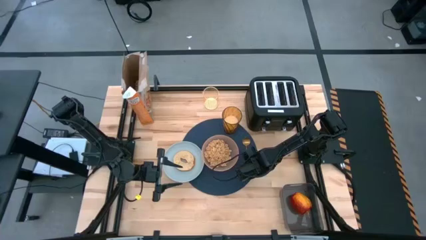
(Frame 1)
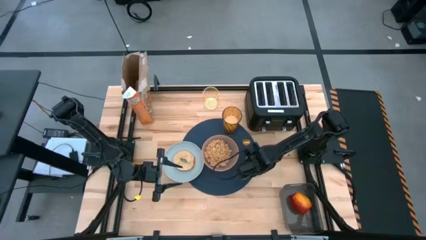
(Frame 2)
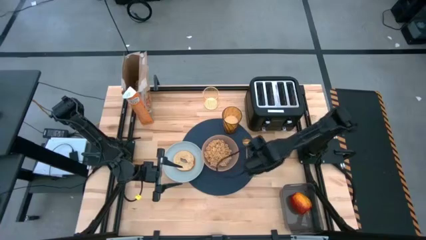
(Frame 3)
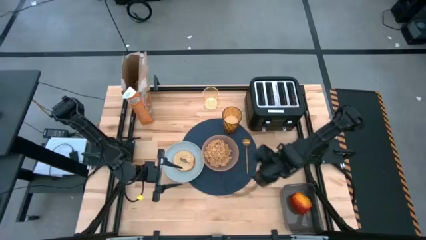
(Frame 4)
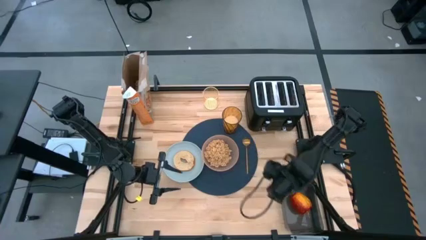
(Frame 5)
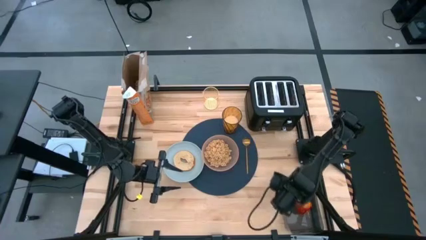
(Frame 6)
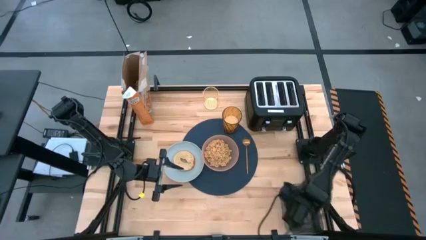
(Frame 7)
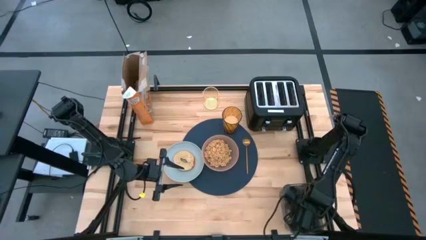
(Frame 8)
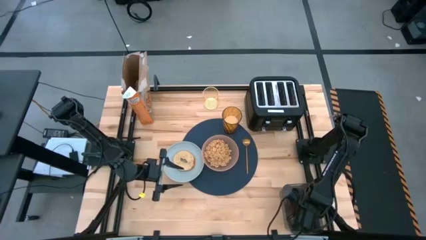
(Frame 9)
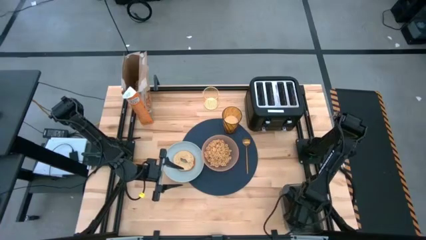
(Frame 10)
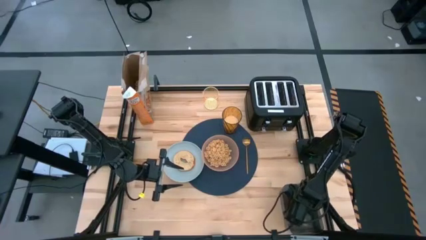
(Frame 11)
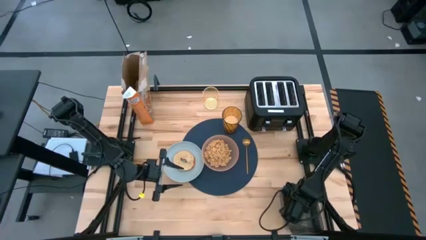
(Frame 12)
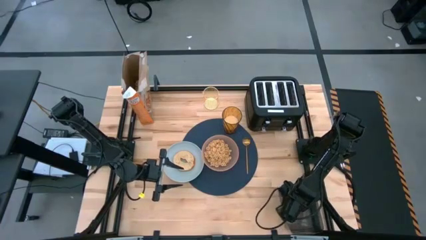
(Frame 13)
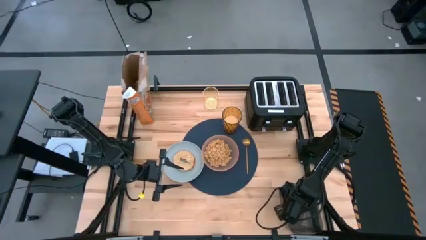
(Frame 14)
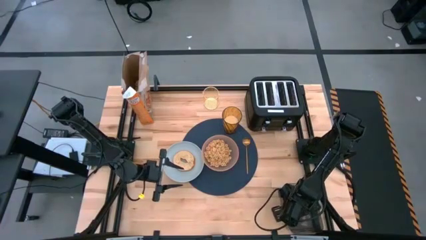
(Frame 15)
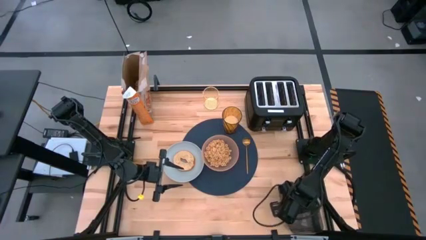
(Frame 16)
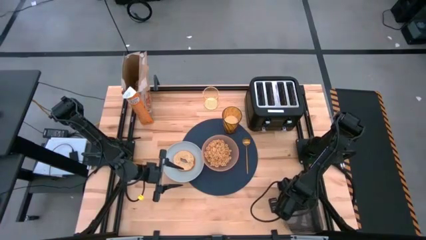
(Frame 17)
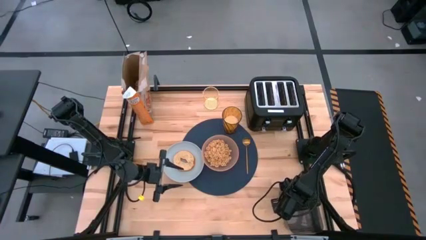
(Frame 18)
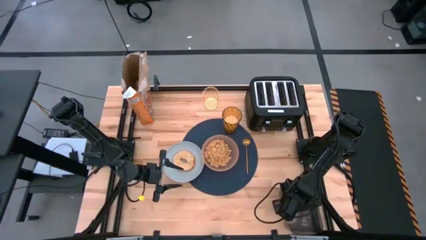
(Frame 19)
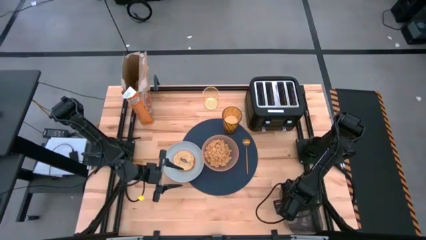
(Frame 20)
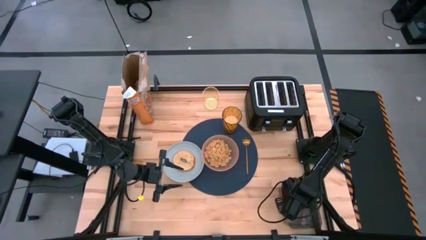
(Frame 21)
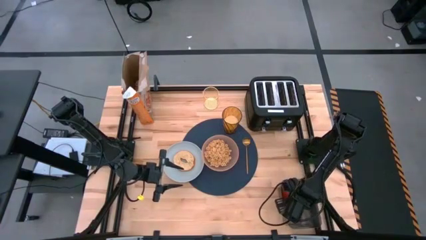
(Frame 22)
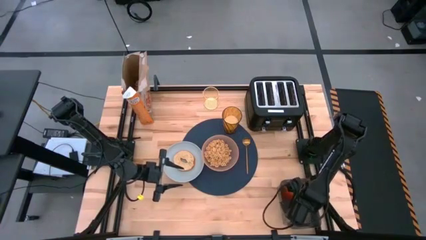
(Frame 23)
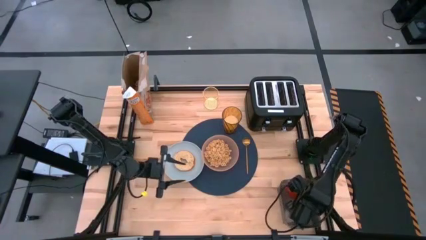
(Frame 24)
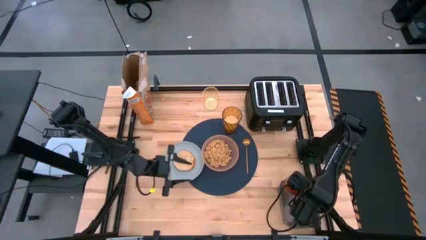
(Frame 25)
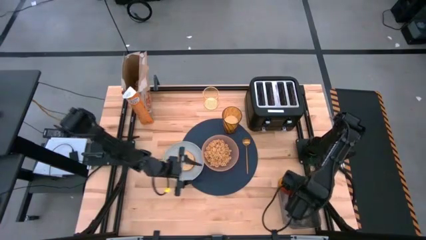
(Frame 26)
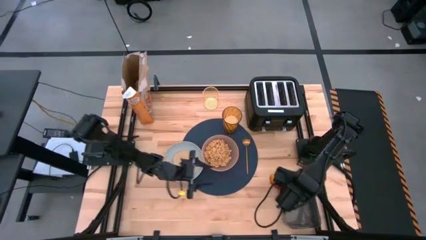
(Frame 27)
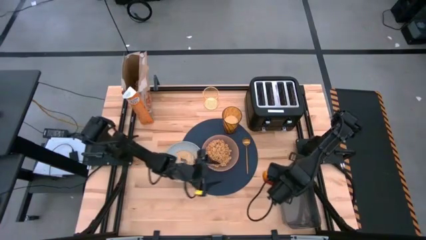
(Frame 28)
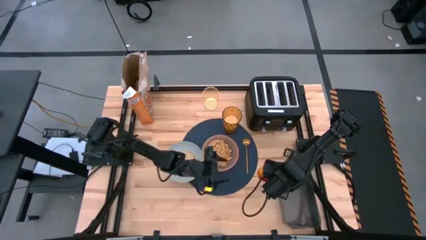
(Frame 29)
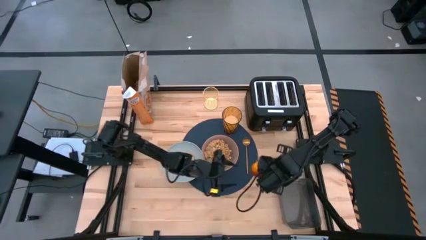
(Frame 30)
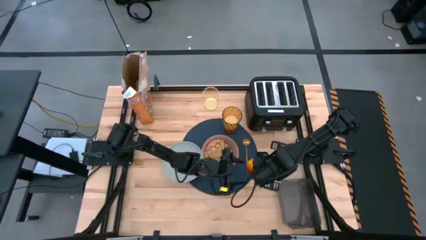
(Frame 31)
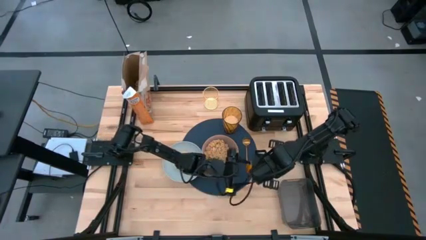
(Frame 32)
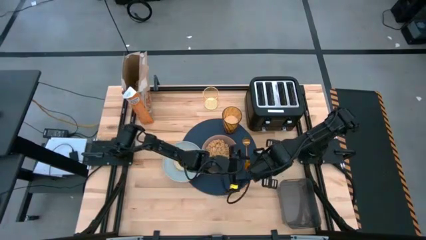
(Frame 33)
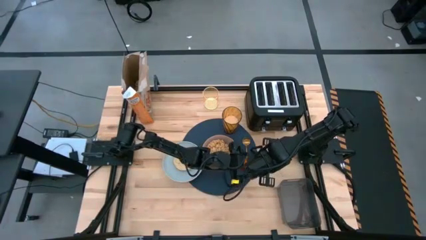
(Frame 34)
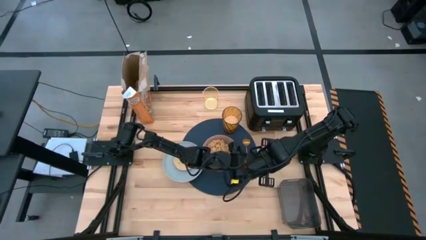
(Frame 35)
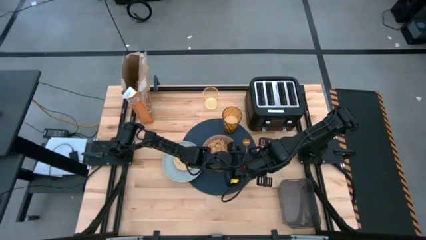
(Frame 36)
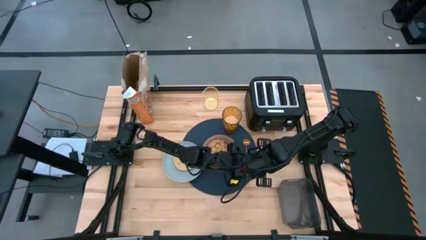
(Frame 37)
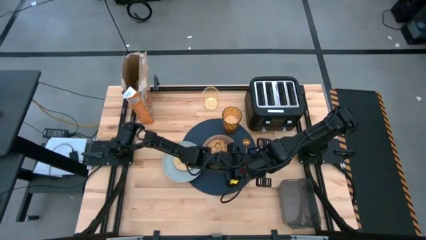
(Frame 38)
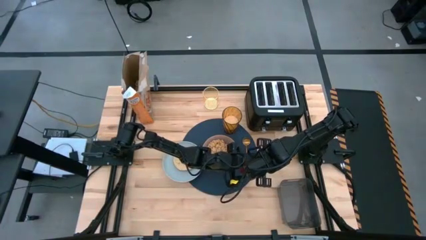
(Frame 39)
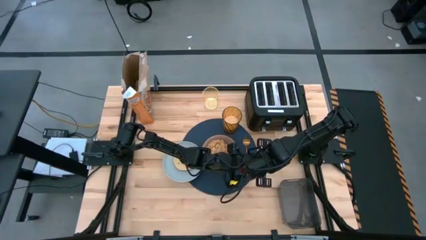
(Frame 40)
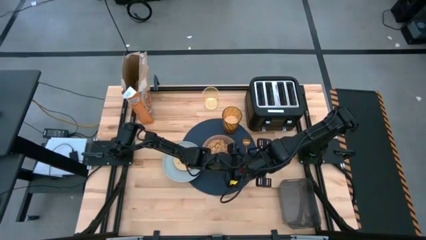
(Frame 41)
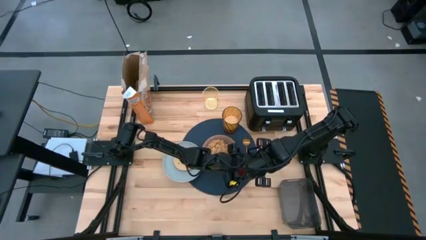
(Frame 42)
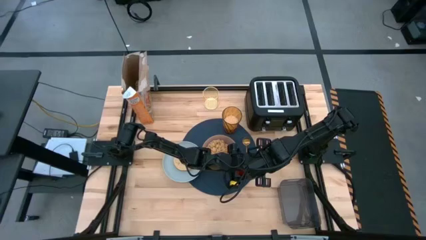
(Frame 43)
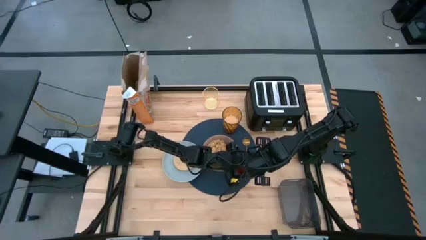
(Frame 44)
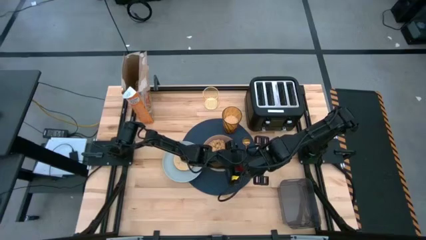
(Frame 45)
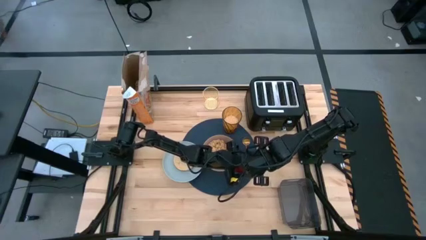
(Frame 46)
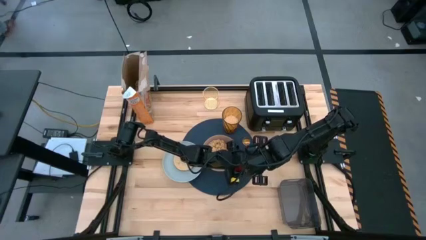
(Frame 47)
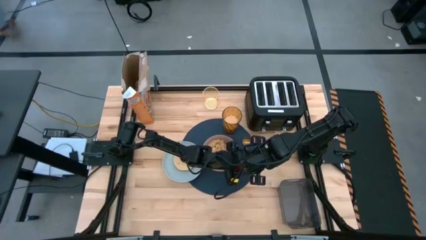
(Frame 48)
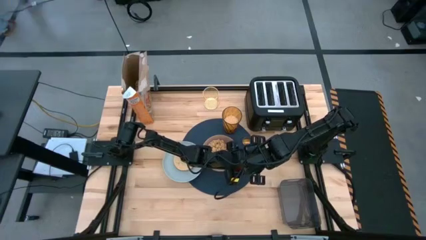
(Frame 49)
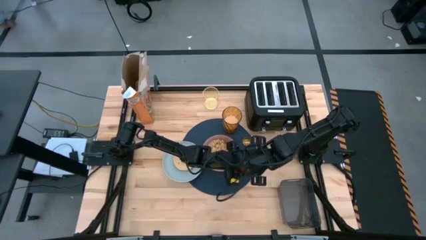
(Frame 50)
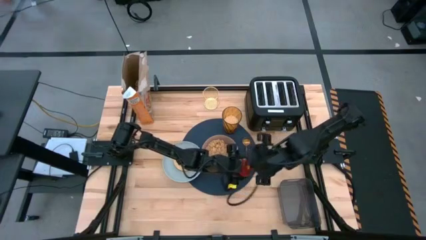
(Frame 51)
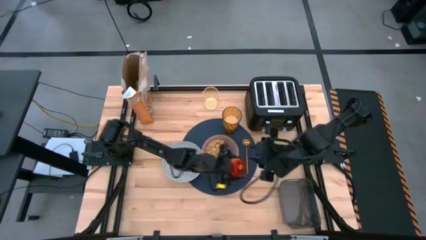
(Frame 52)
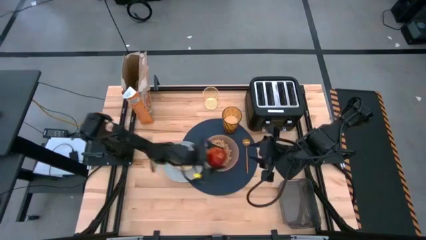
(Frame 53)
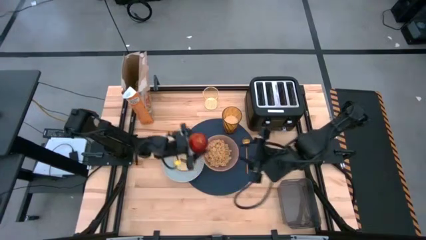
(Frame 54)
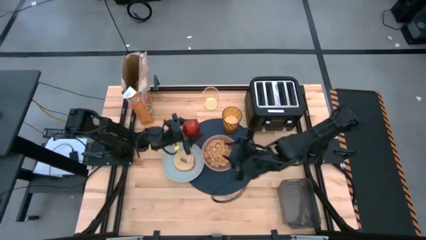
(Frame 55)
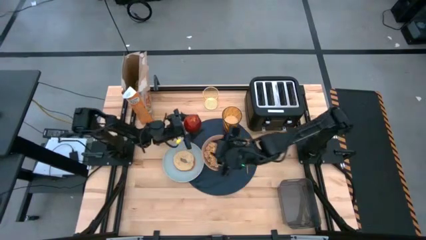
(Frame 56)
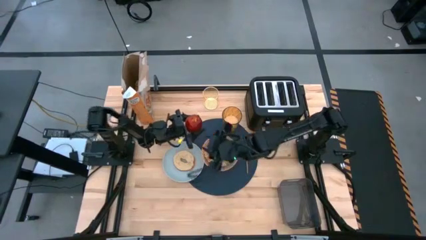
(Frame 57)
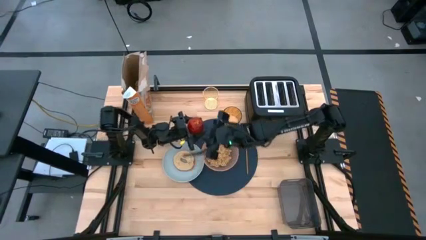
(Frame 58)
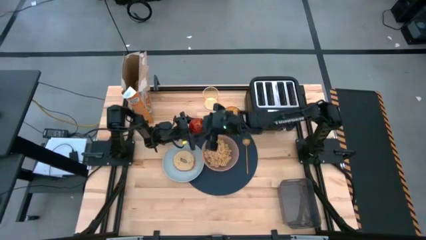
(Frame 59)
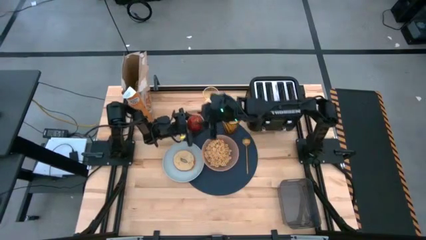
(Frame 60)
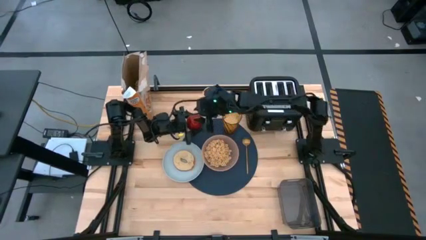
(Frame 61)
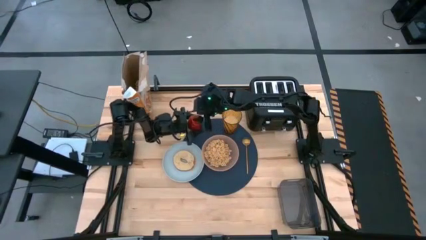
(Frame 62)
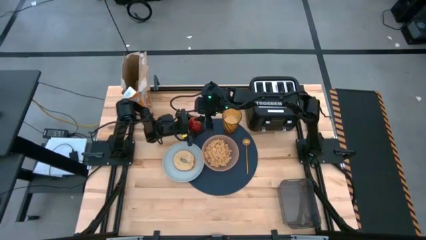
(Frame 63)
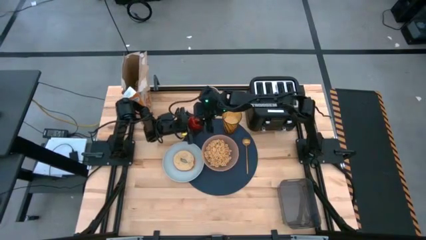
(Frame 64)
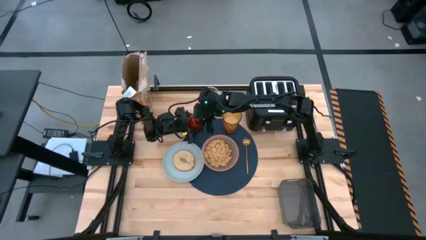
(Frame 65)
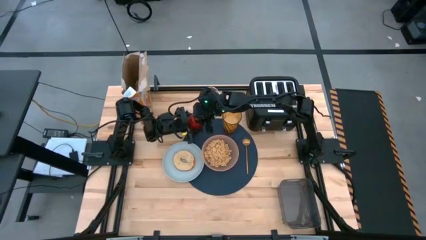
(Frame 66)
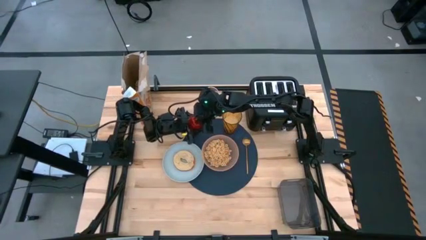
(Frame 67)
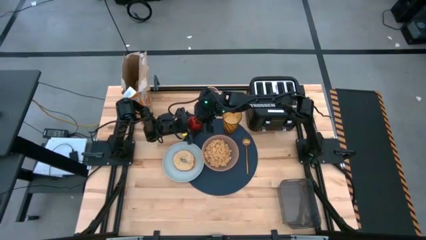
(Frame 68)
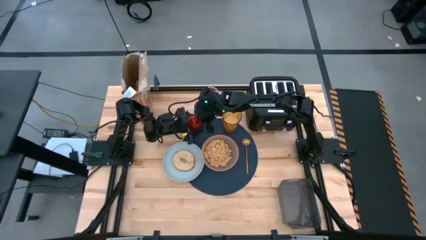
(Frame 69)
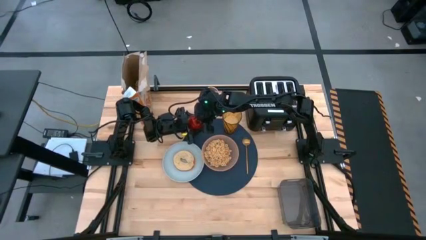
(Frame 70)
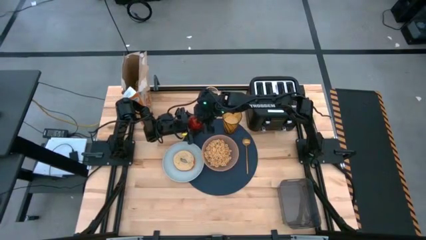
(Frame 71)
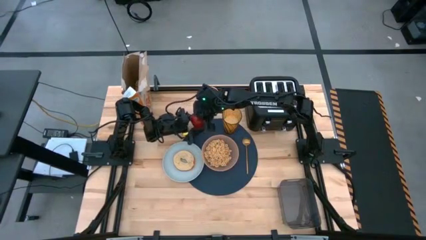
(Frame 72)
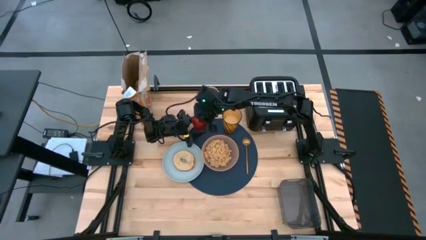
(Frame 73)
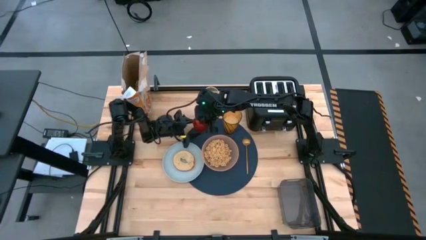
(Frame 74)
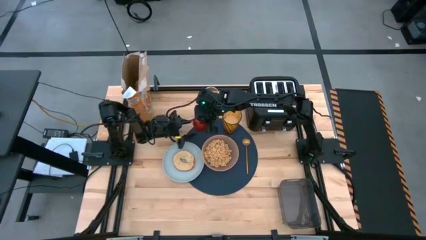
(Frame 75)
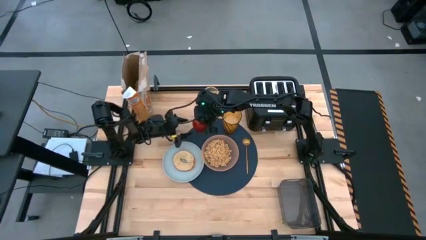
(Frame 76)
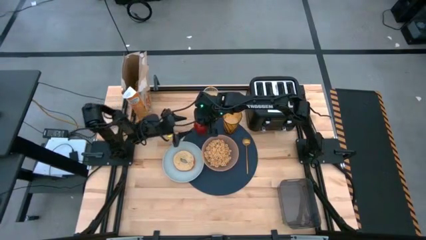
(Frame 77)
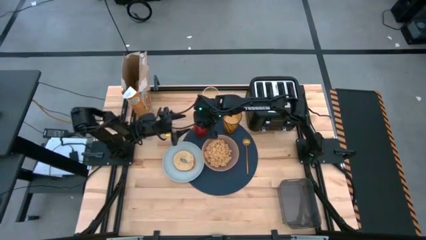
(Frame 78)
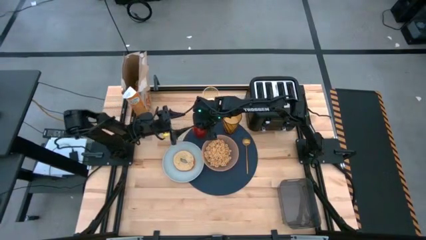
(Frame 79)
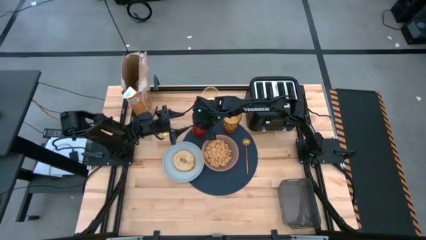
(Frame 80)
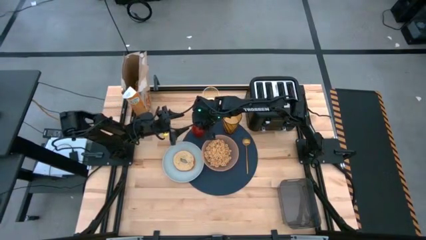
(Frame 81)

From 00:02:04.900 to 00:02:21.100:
Task: Arrange a breakfast setting
Put the apple from the black bin on the top left of the orange bowl
